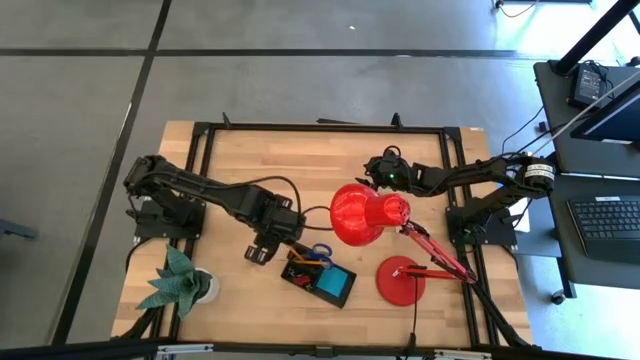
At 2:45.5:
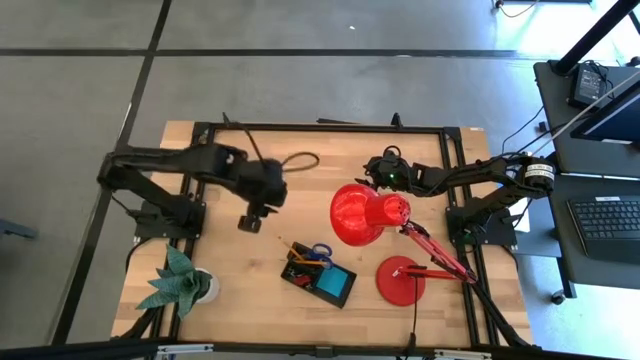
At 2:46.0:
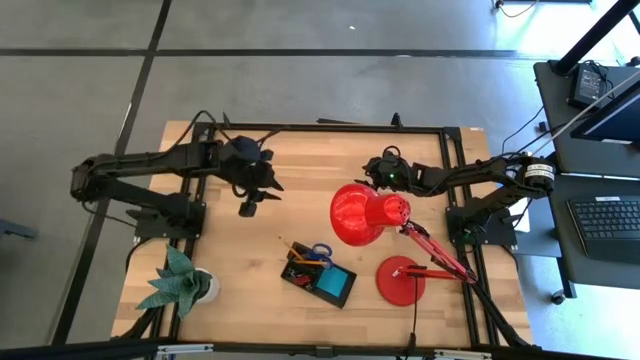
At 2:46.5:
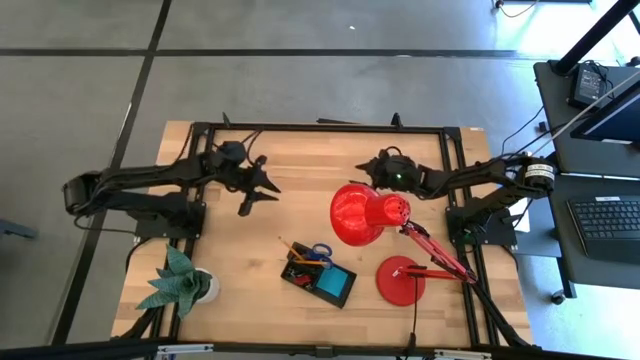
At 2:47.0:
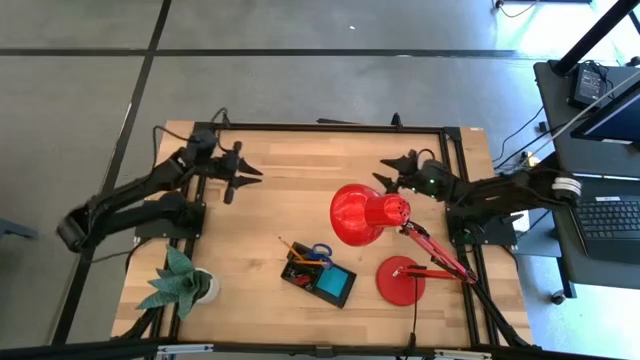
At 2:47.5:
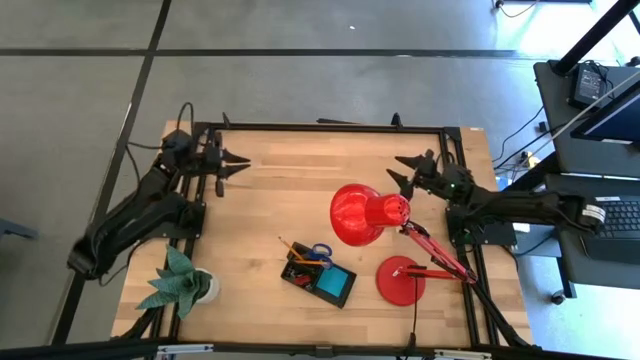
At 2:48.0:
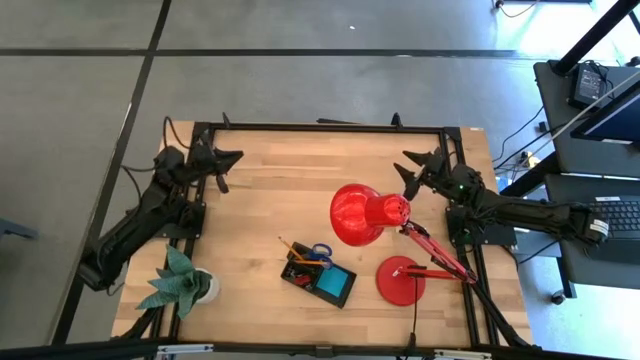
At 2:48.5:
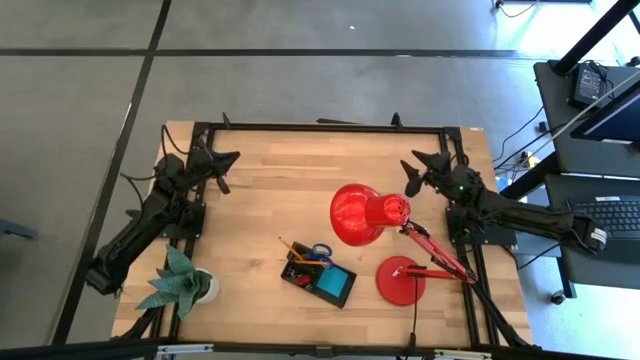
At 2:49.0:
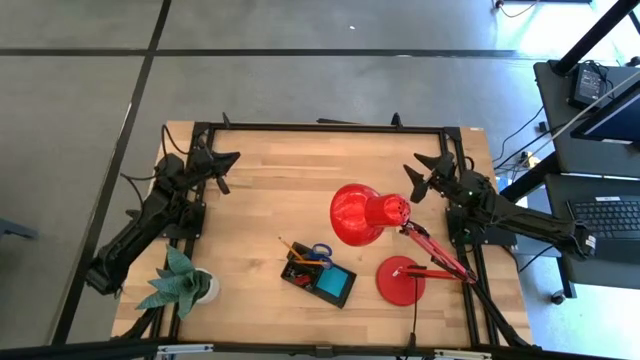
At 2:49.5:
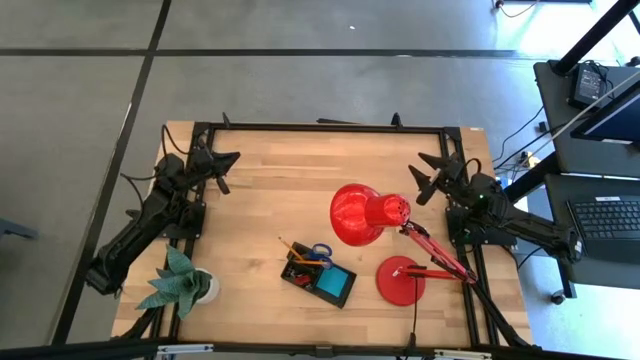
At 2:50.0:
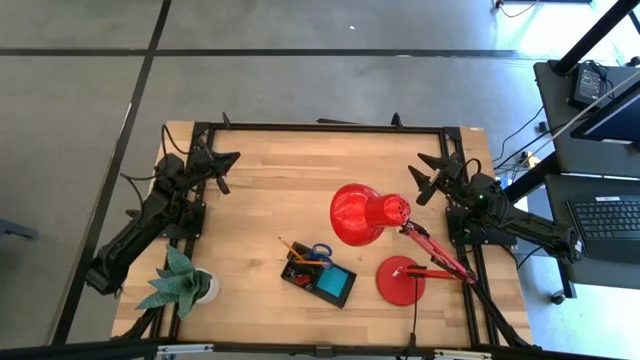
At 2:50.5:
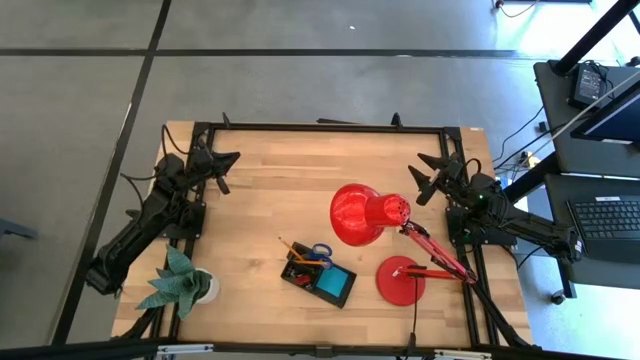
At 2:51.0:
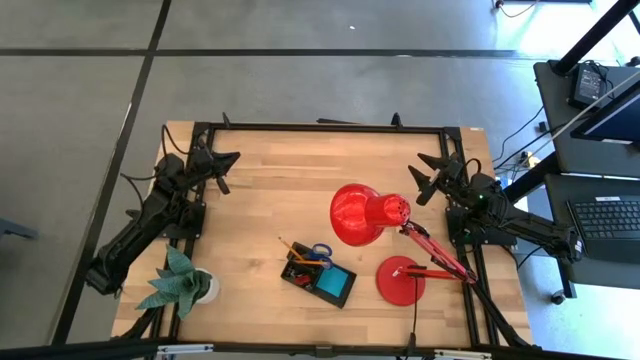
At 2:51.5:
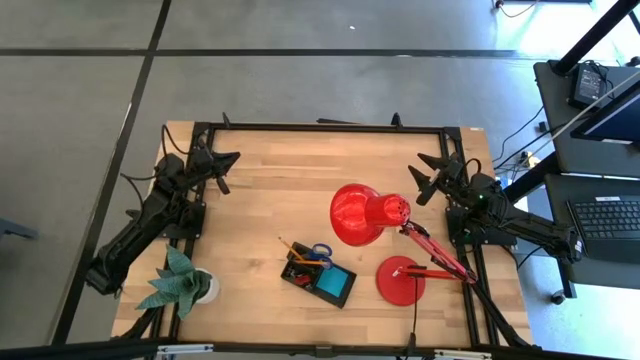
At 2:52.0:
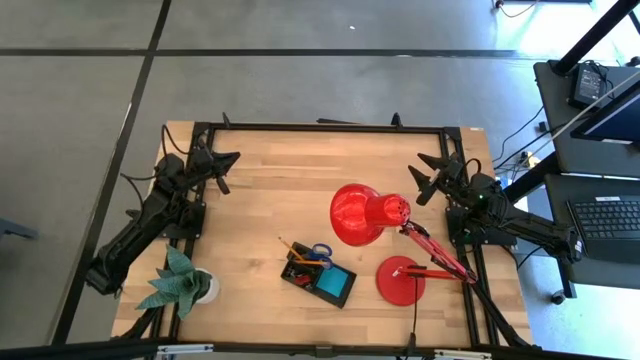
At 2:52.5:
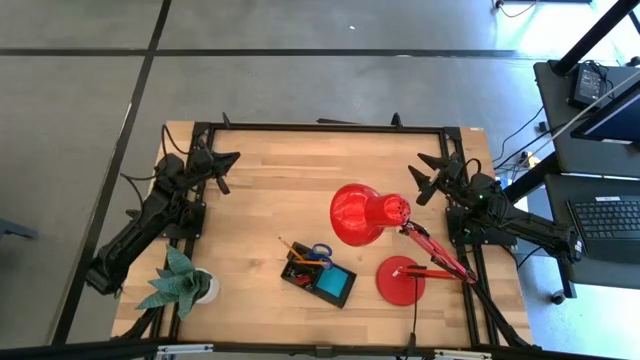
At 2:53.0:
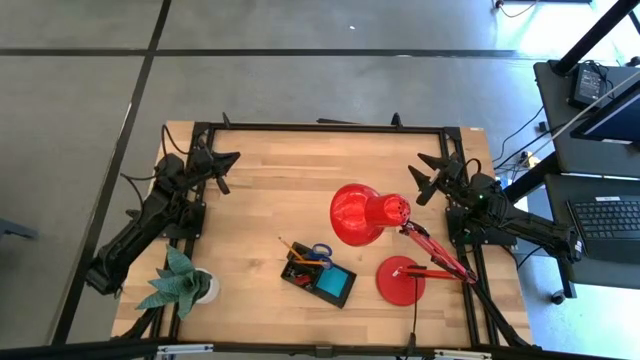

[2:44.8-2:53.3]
Task: Pick and place office supplies into organizer
Return to Home Position

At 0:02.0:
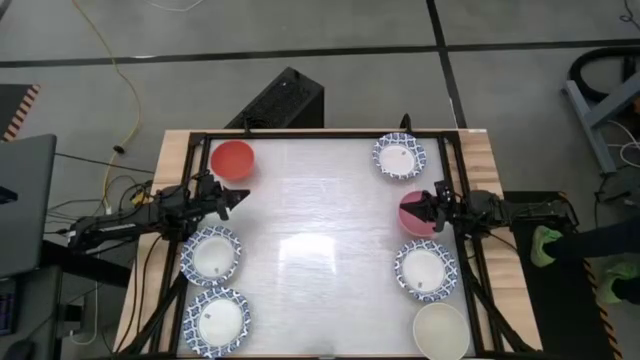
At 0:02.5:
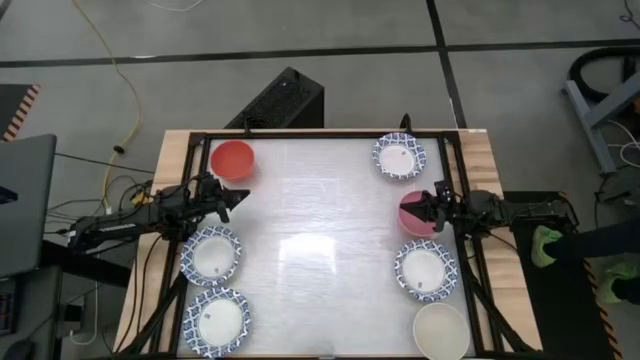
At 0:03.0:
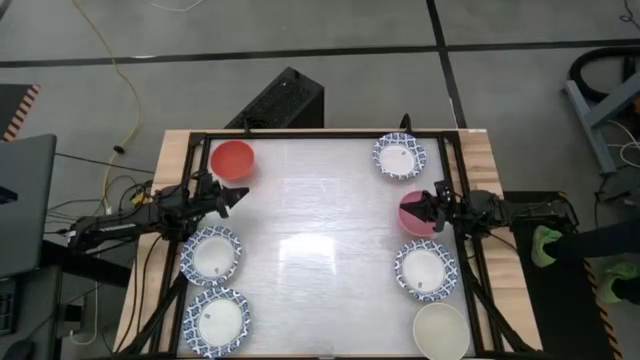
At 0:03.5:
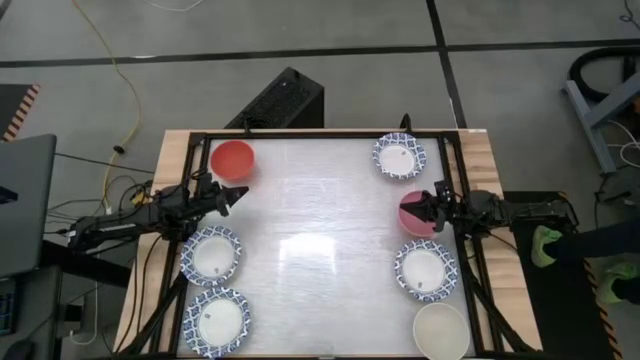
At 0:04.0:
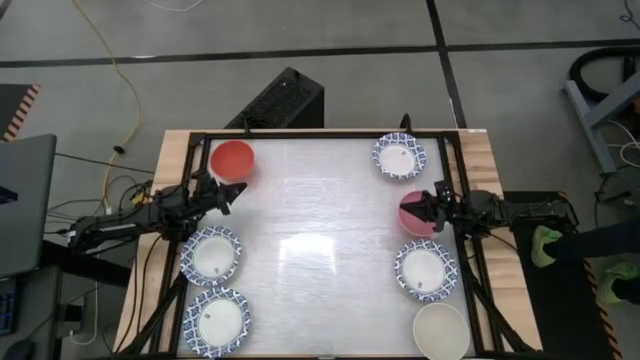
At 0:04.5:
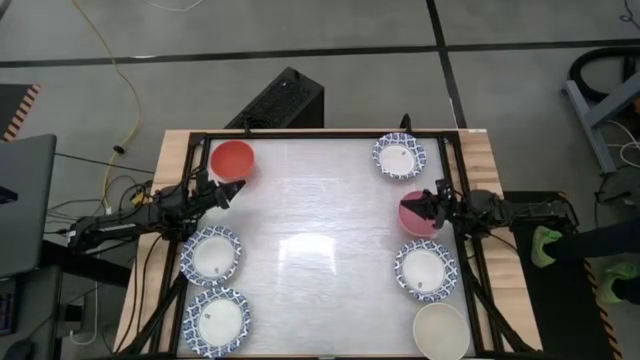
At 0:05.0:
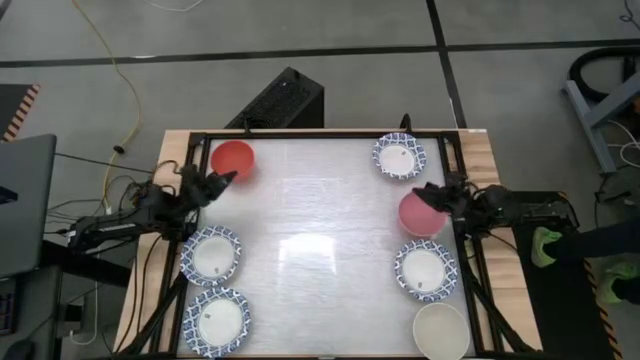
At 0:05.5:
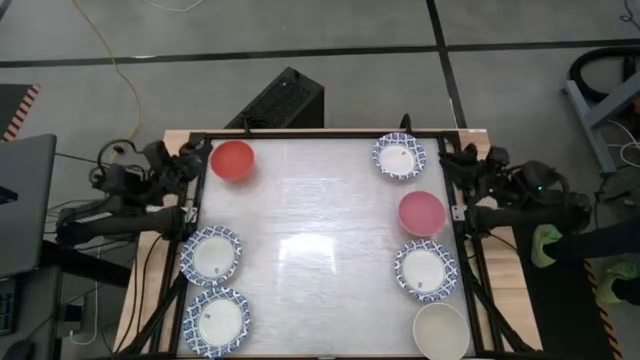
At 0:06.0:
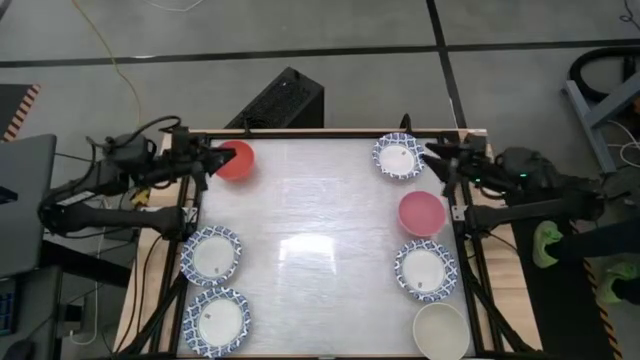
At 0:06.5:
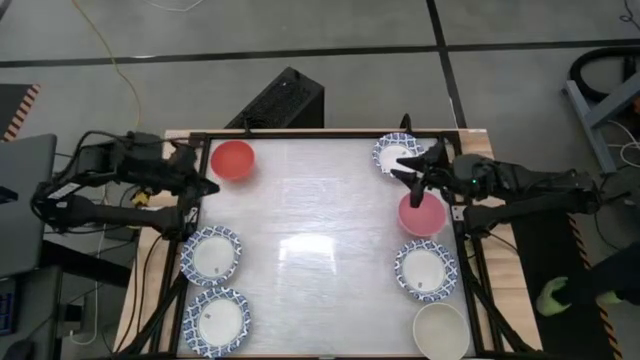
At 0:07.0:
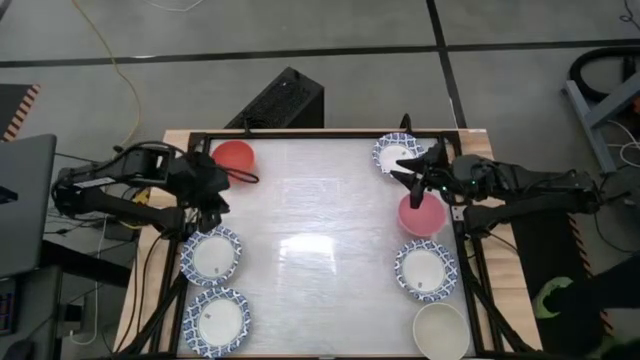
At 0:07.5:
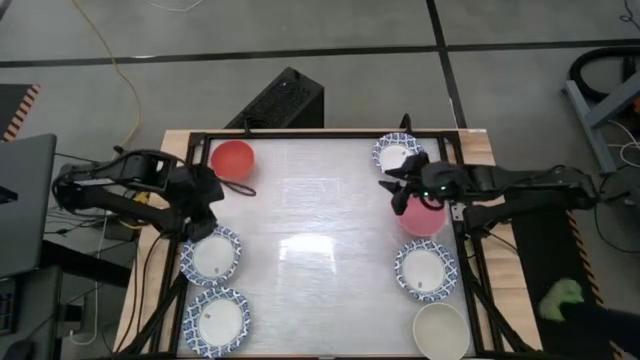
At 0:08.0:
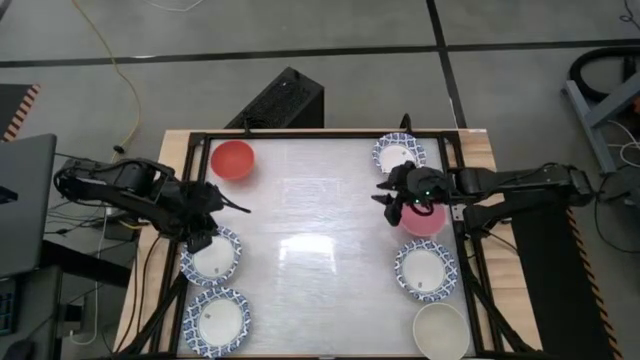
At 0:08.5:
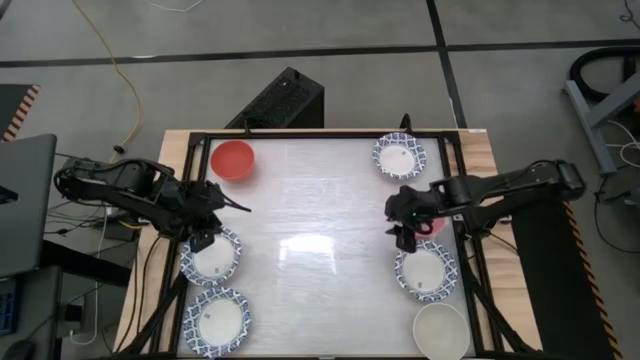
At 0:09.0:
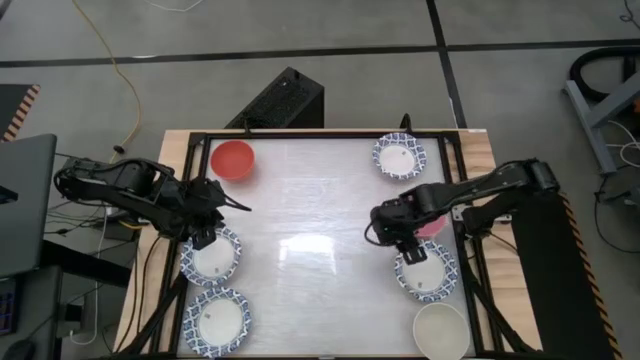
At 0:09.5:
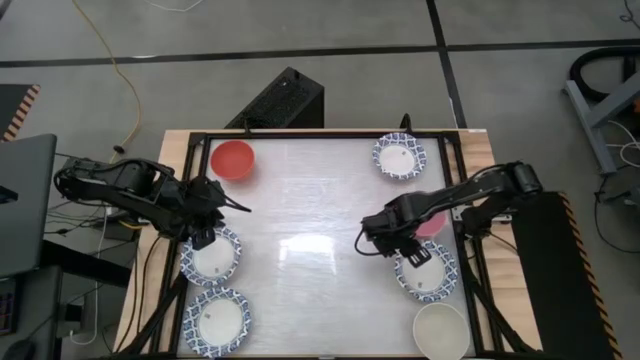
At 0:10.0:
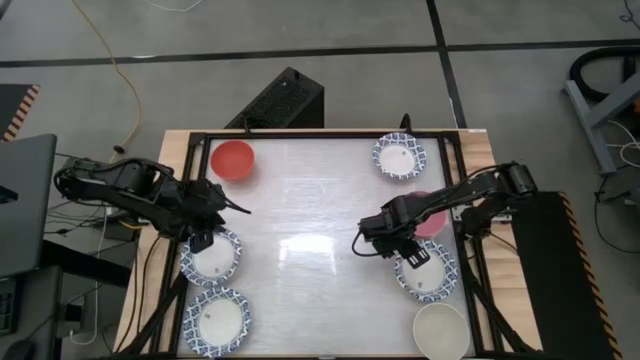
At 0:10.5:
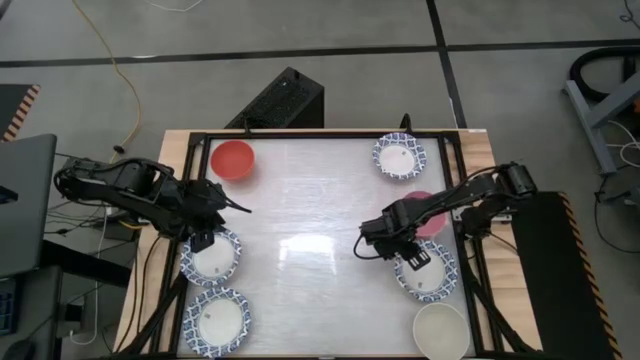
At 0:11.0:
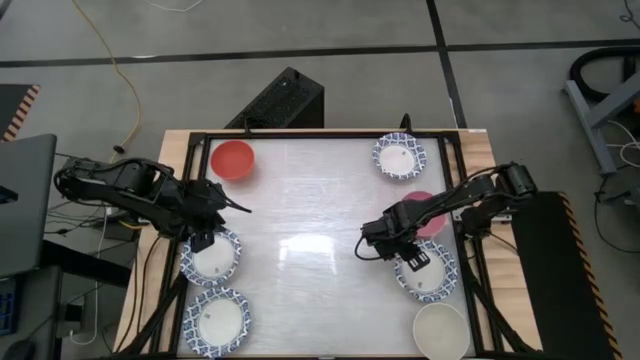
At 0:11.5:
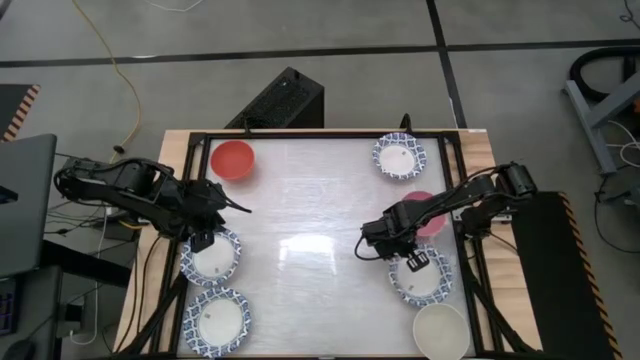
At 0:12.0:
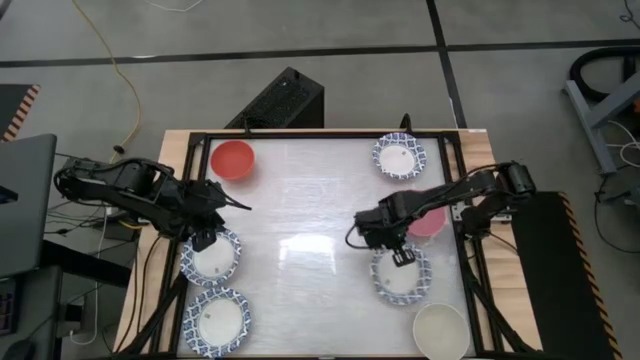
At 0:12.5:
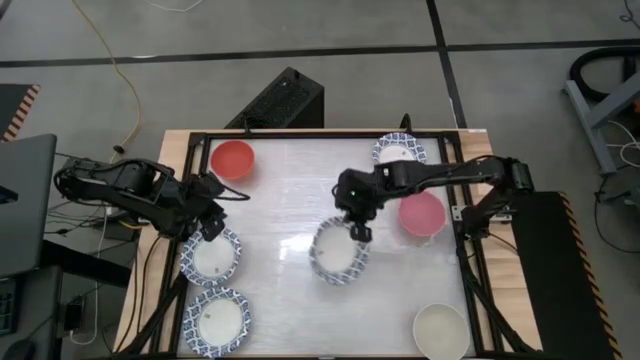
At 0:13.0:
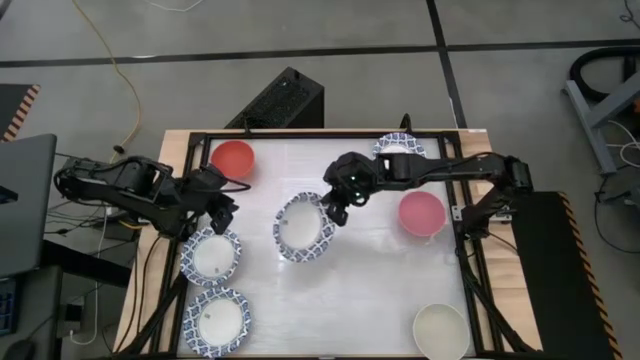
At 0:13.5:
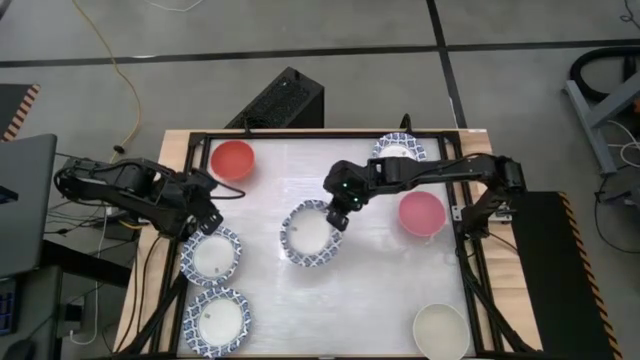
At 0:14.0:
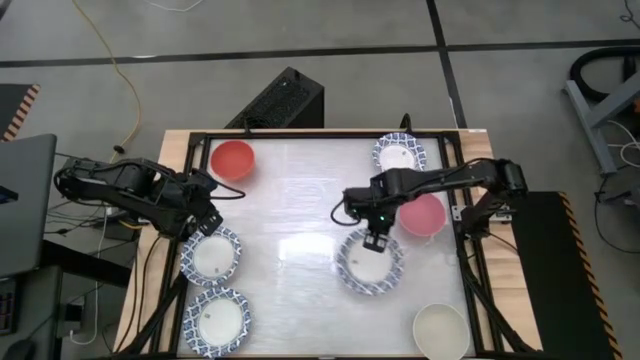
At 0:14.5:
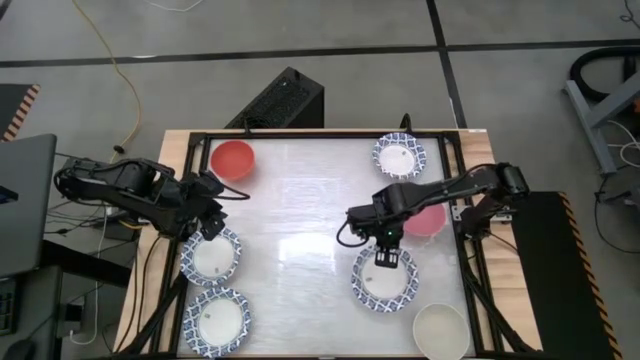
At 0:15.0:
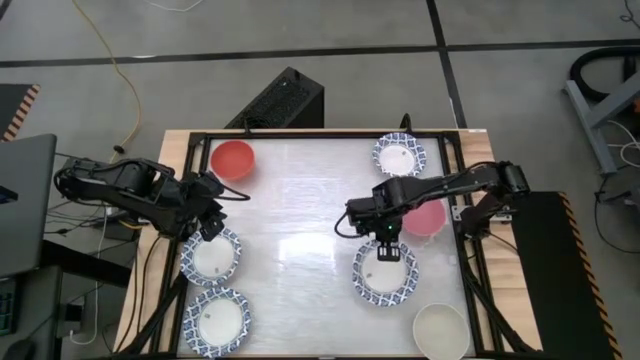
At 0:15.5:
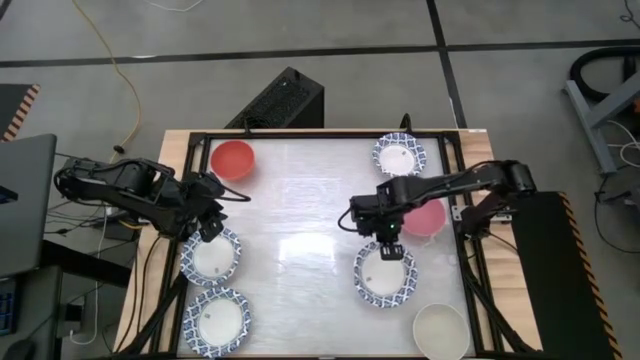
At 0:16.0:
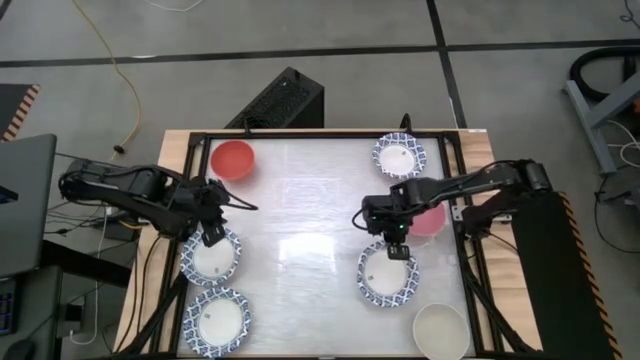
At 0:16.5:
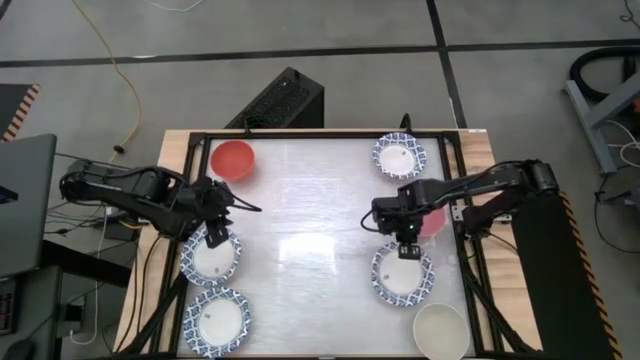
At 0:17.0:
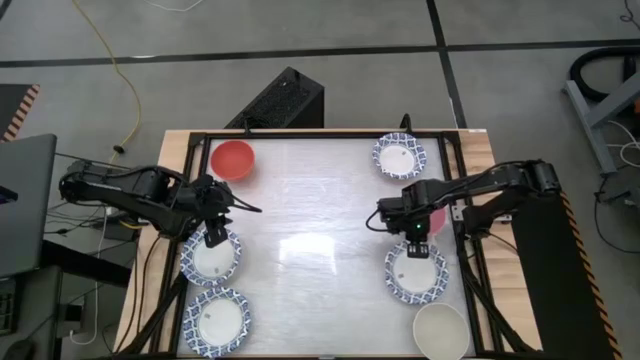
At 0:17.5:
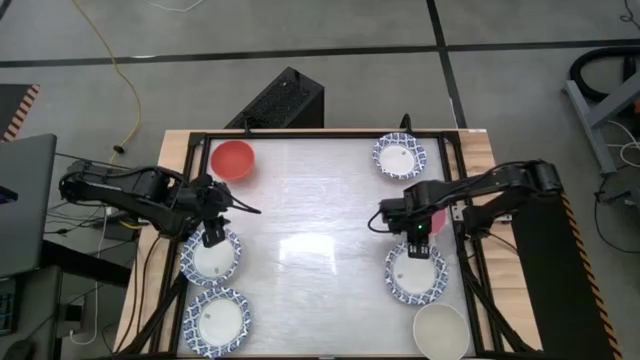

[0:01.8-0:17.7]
Task: Nest bowls inside each other by size order
Prepare the bottom right blue bowl on the table
